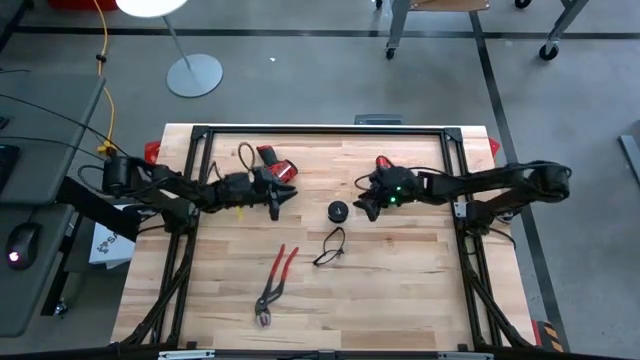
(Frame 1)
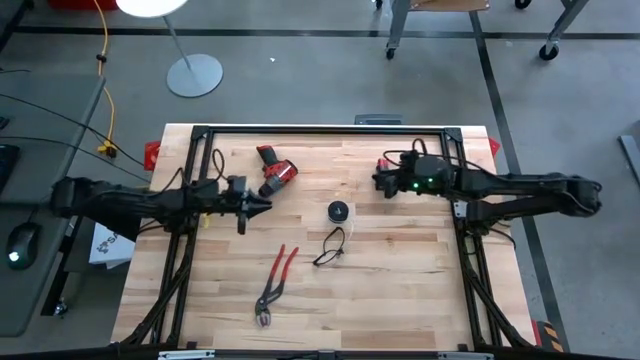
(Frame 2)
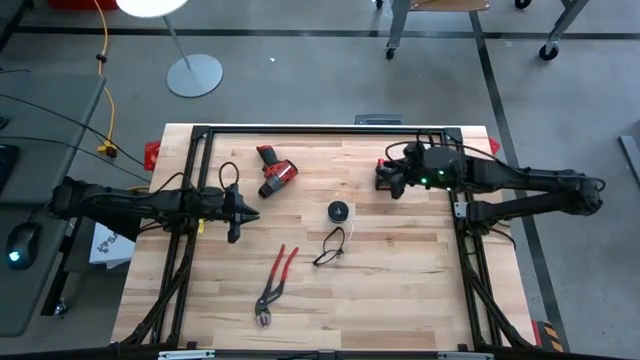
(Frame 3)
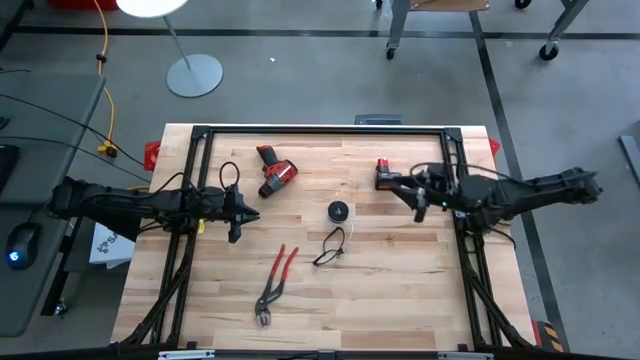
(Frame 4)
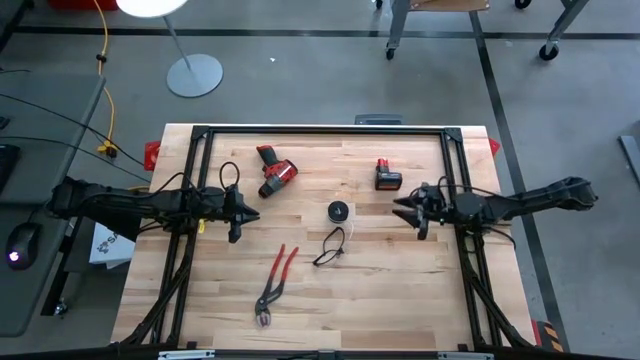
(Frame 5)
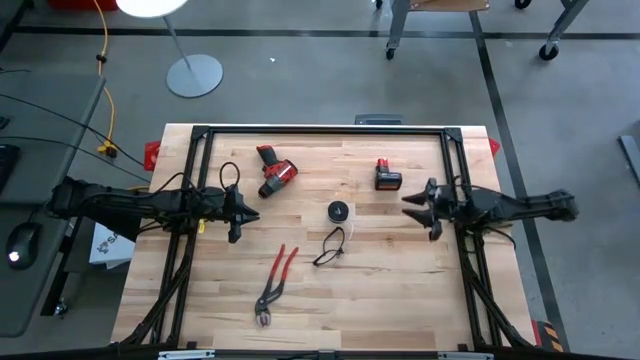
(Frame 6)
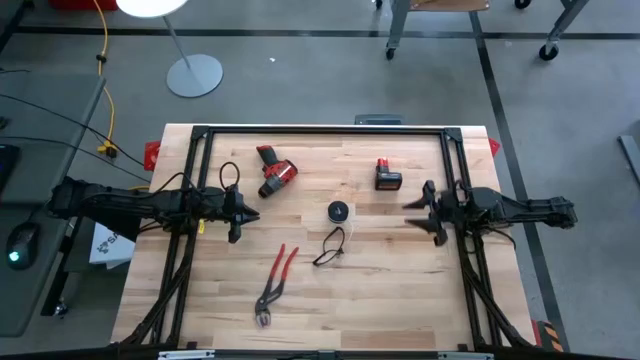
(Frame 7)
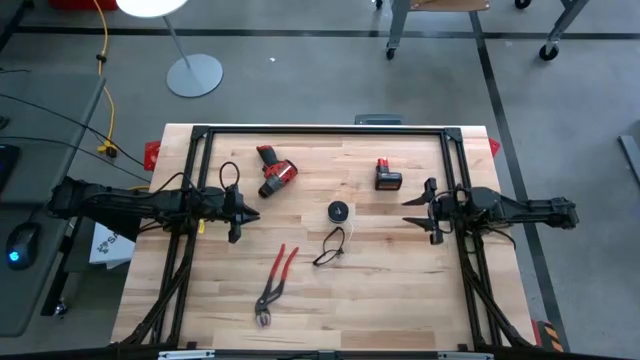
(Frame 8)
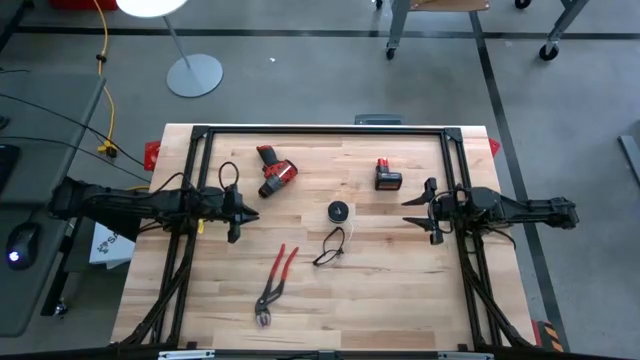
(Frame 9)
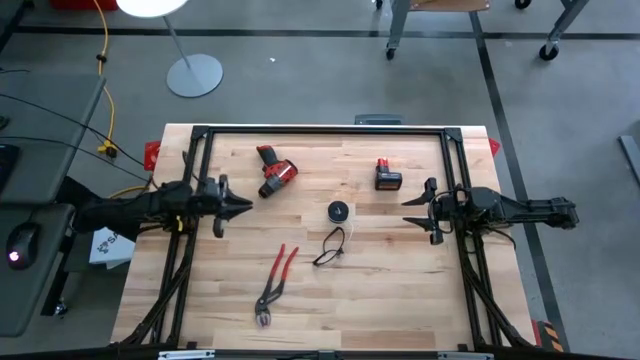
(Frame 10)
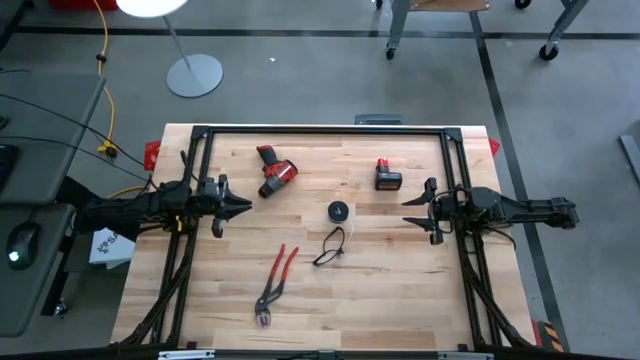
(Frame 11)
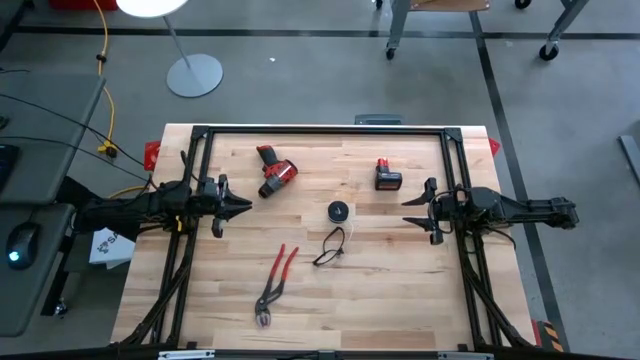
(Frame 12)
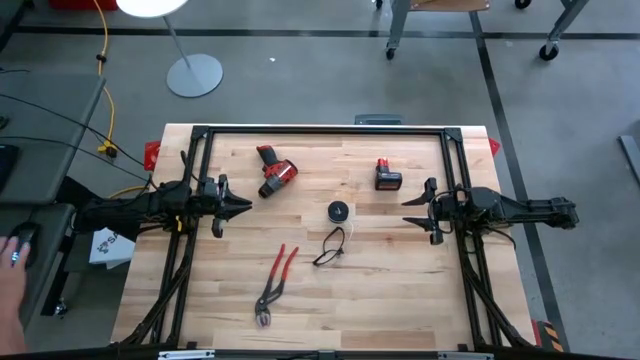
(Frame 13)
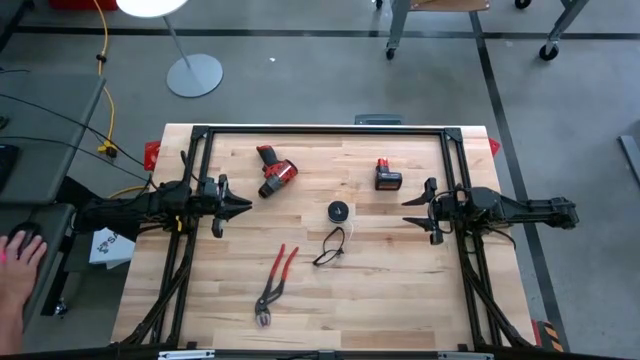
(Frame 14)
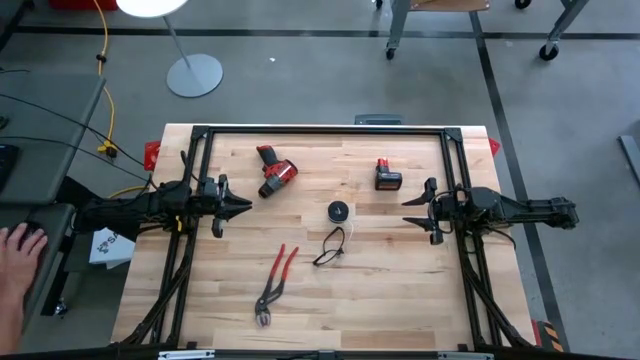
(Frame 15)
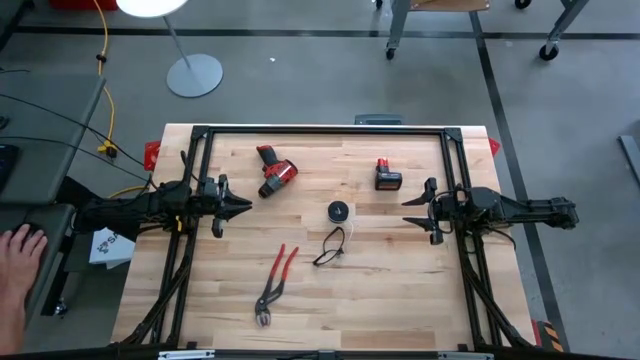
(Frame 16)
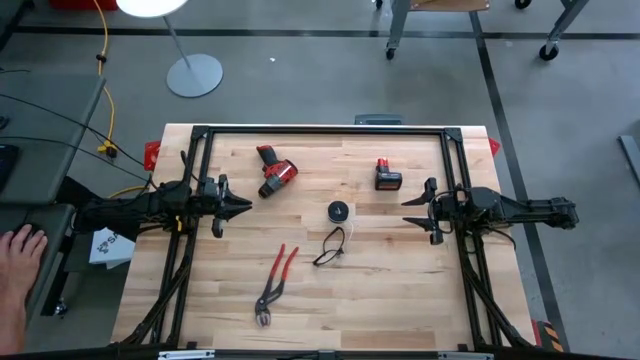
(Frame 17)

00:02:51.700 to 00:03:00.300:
Task: Coil cords
Return to Home Position

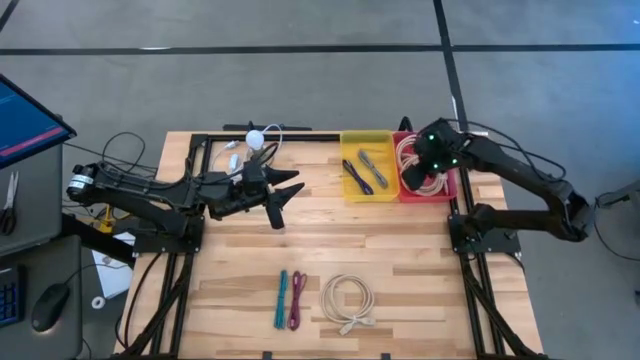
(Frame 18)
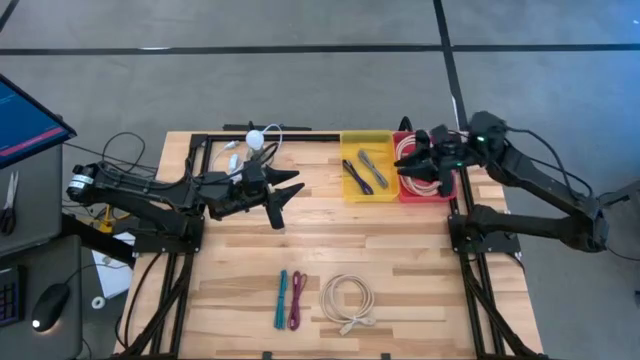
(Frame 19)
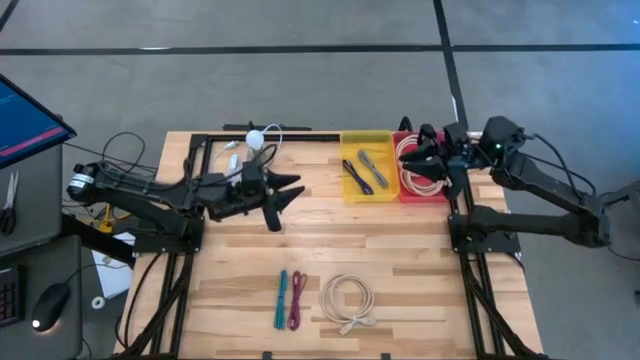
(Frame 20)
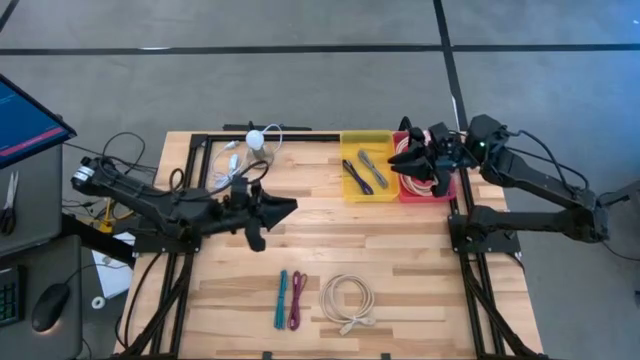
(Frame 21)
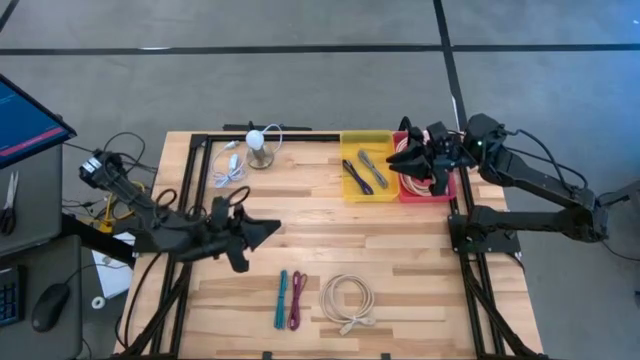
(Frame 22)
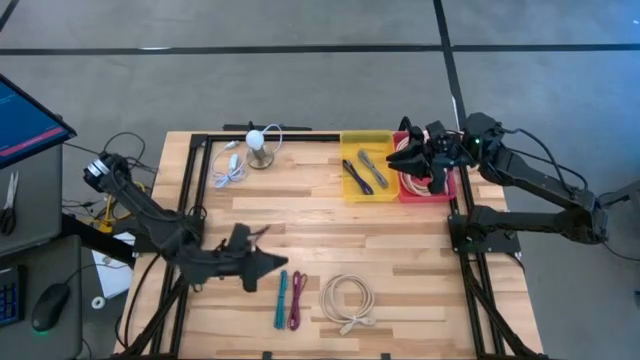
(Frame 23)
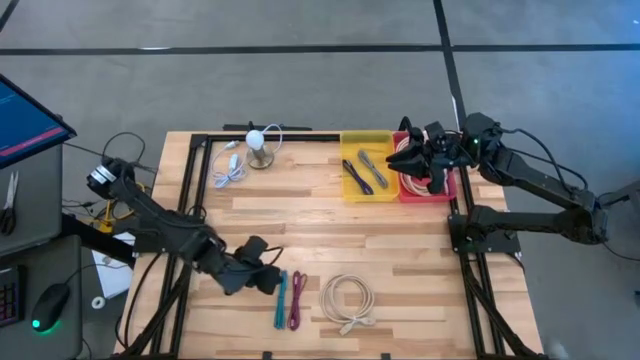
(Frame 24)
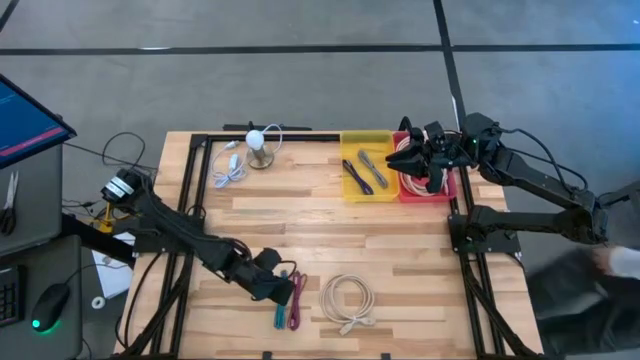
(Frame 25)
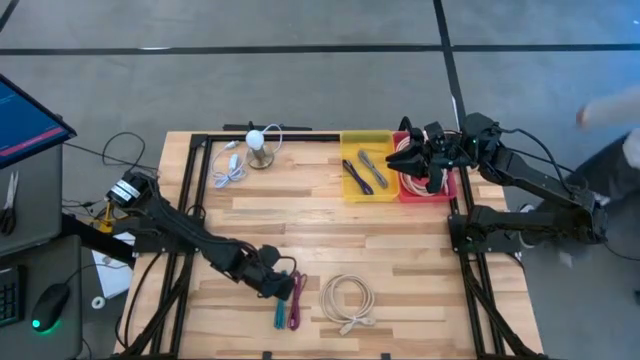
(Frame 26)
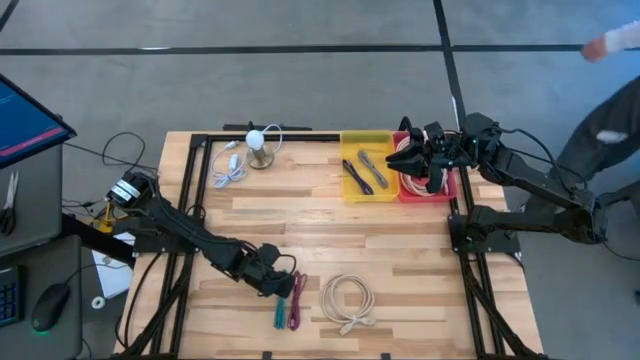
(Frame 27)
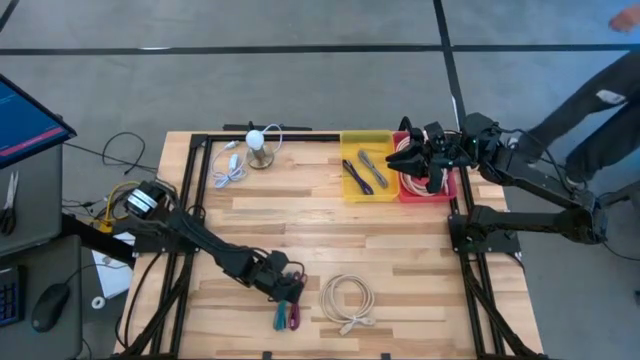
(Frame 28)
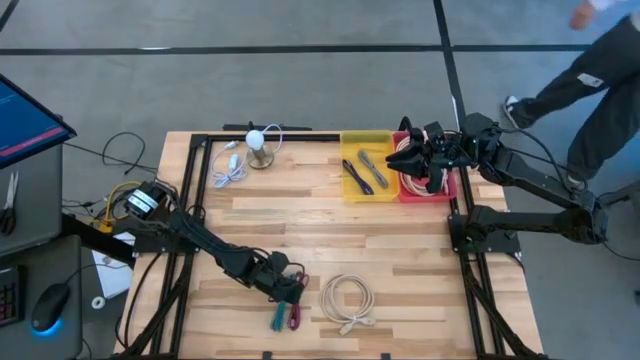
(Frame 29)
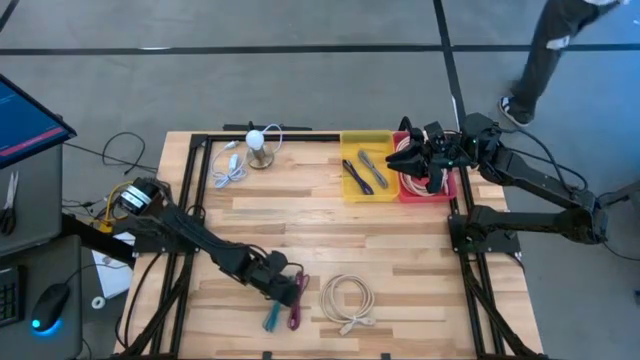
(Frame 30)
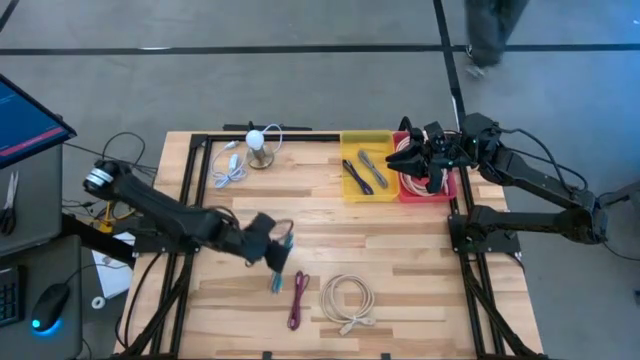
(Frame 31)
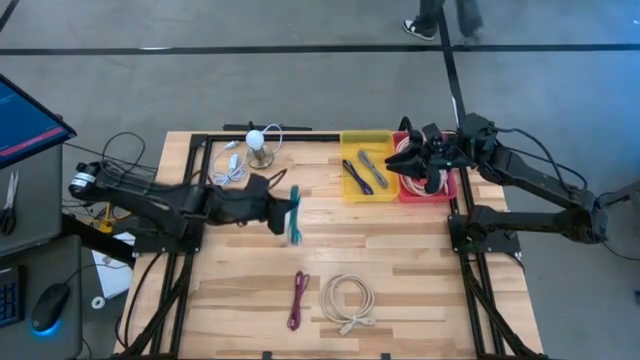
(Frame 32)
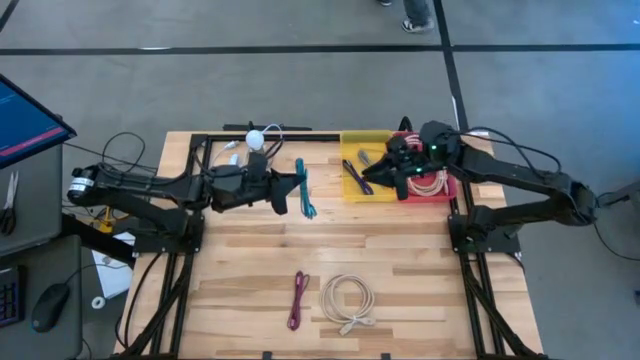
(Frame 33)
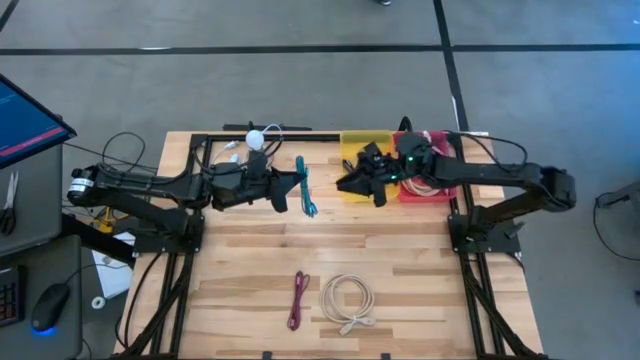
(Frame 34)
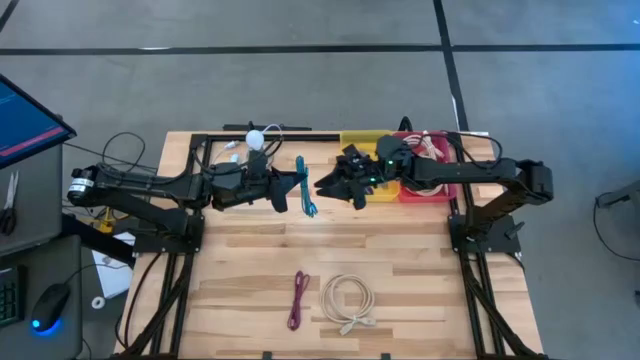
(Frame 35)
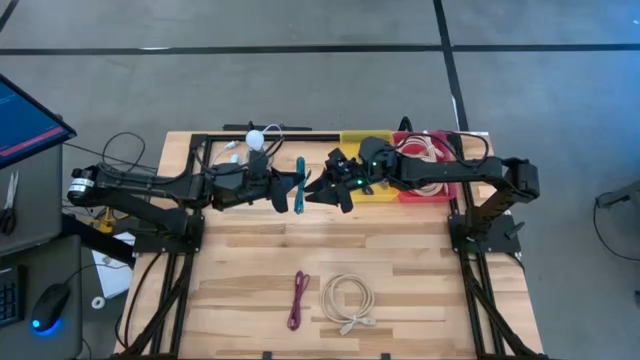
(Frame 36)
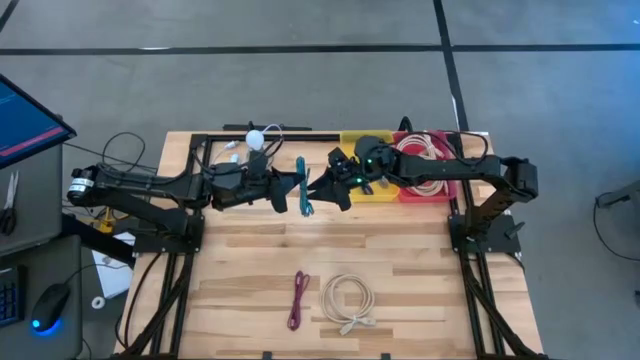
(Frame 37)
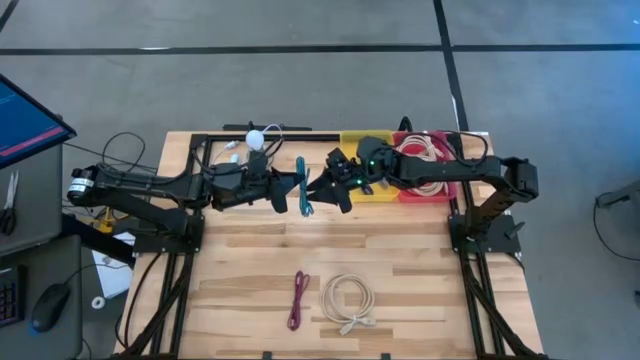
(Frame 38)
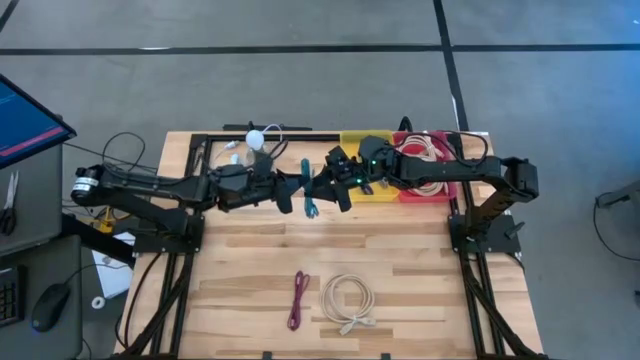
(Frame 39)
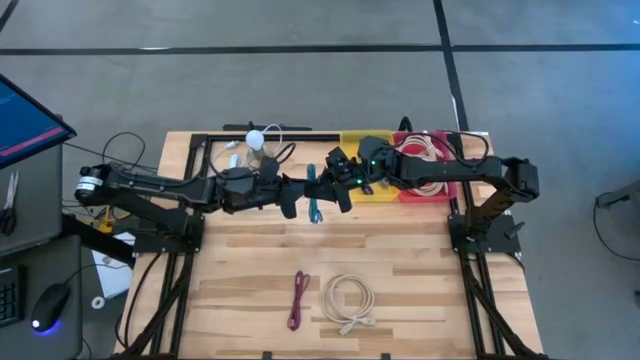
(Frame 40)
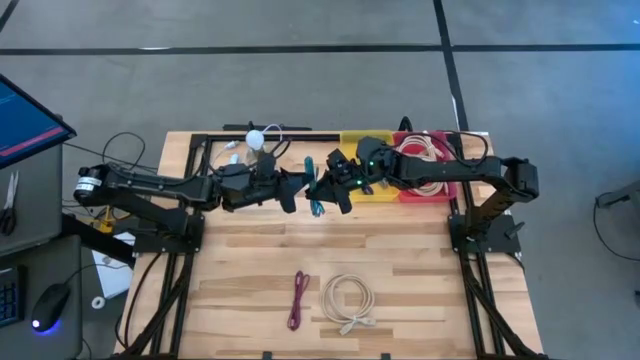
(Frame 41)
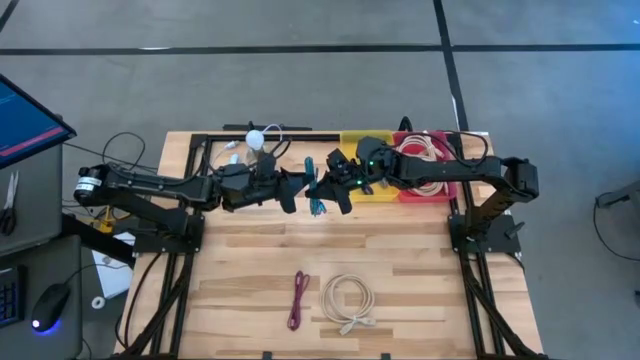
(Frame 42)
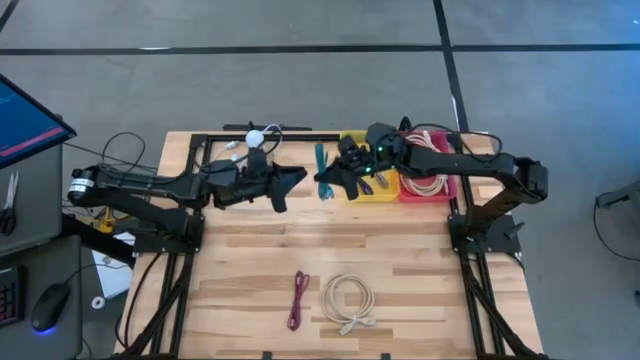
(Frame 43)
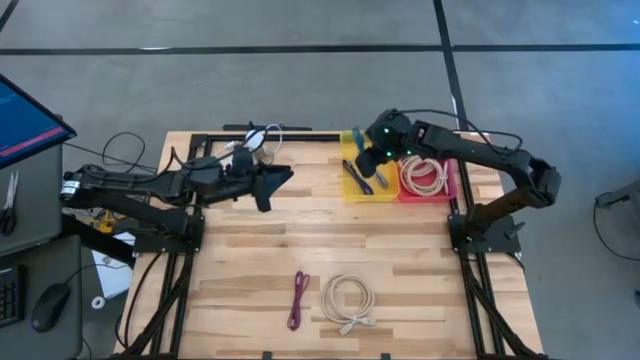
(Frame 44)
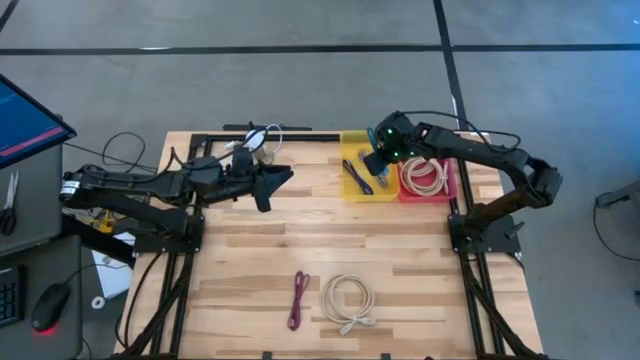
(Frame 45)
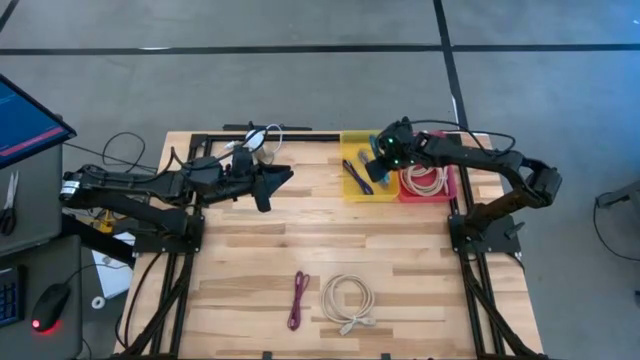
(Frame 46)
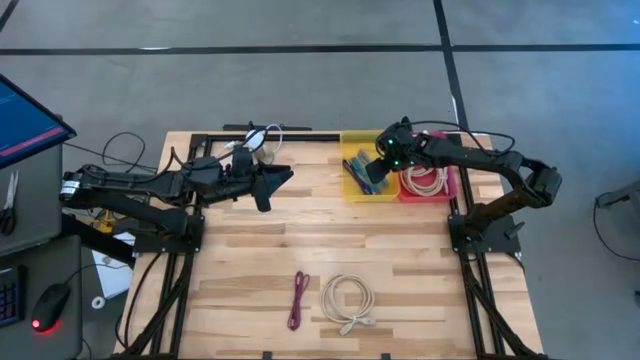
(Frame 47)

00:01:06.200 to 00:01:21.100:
Task: Pick & Place USB Port
Put the blue charger cable into the yellow bin
